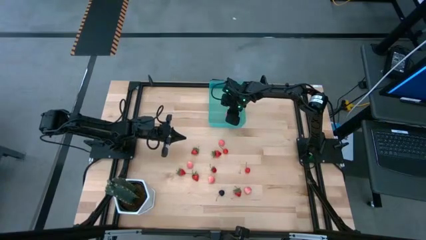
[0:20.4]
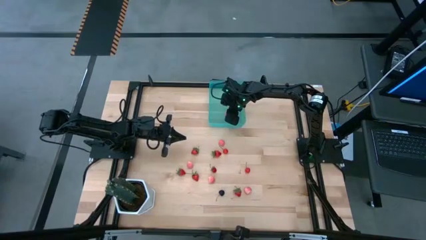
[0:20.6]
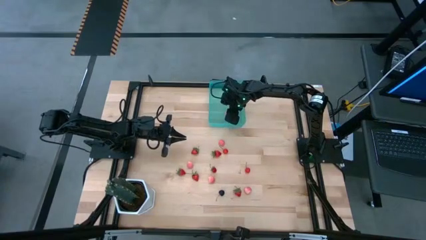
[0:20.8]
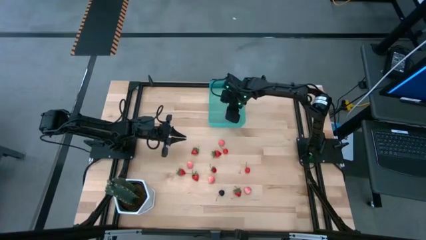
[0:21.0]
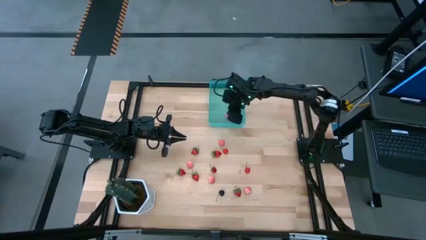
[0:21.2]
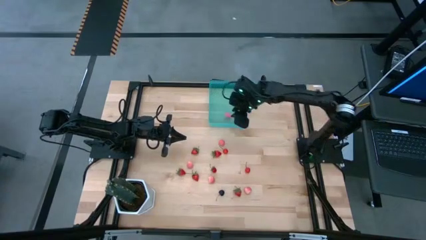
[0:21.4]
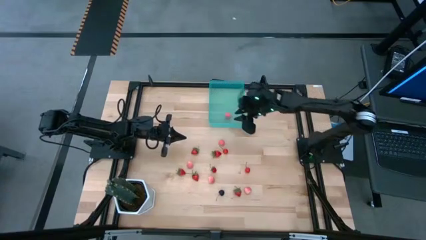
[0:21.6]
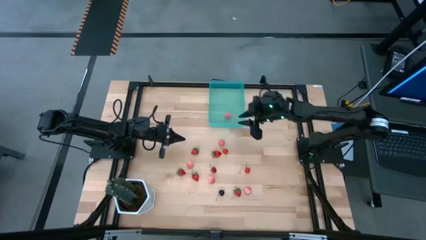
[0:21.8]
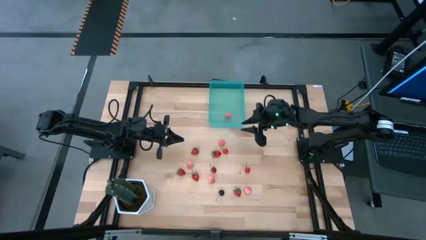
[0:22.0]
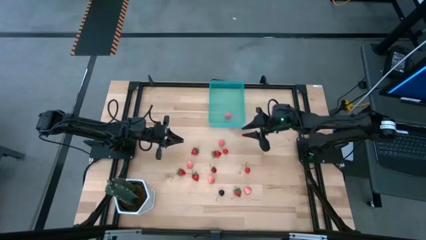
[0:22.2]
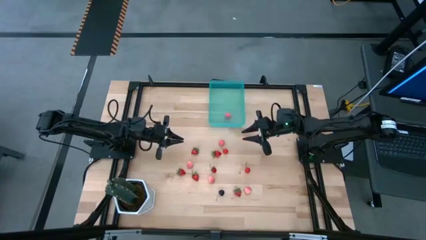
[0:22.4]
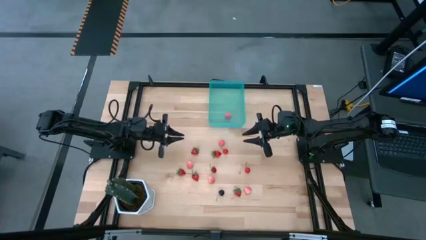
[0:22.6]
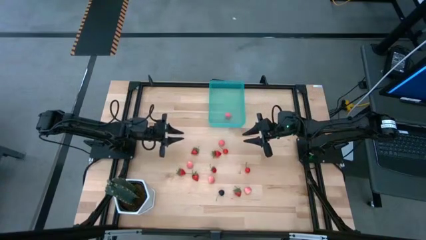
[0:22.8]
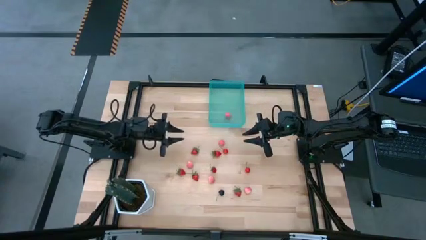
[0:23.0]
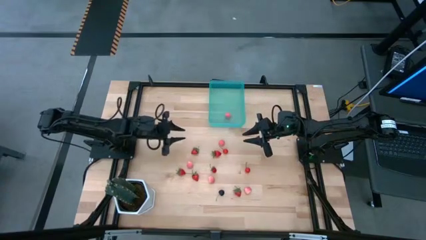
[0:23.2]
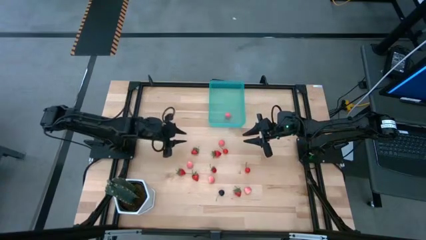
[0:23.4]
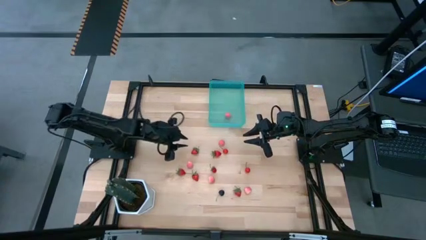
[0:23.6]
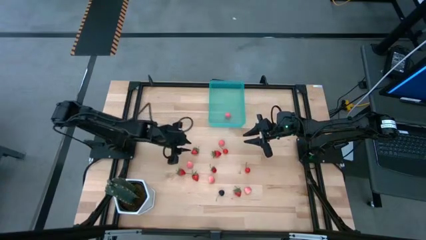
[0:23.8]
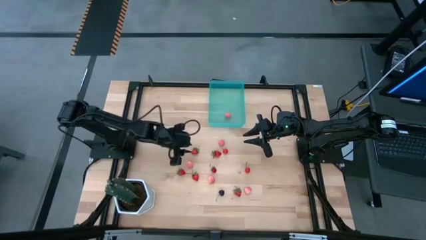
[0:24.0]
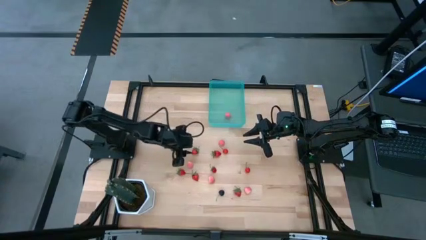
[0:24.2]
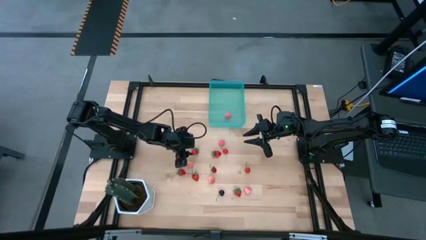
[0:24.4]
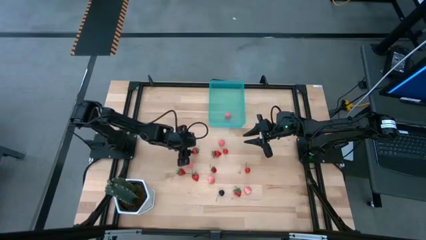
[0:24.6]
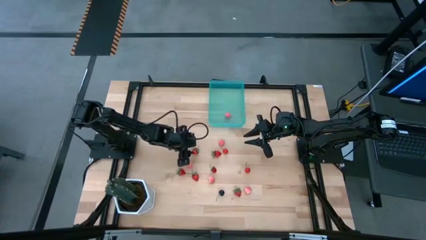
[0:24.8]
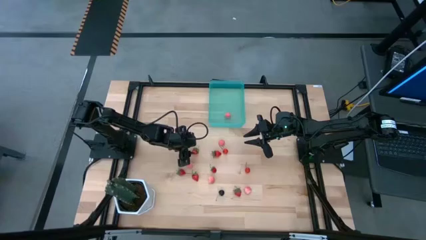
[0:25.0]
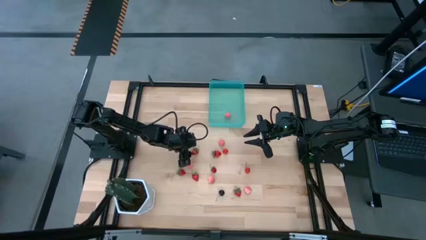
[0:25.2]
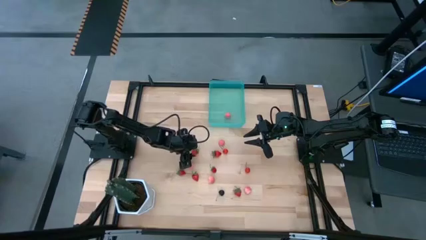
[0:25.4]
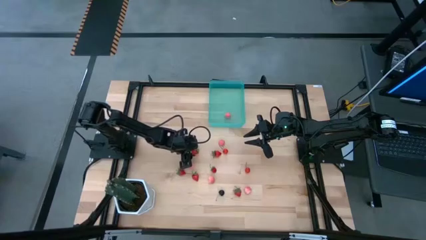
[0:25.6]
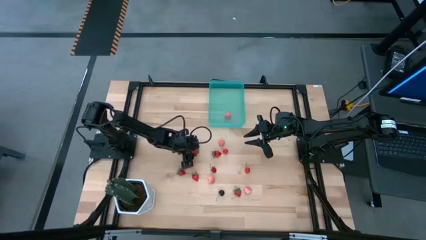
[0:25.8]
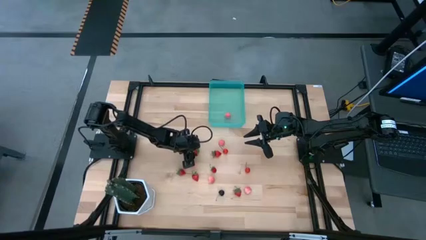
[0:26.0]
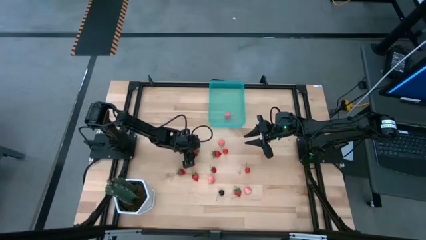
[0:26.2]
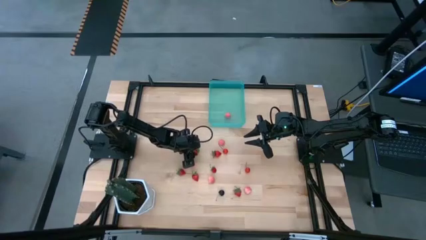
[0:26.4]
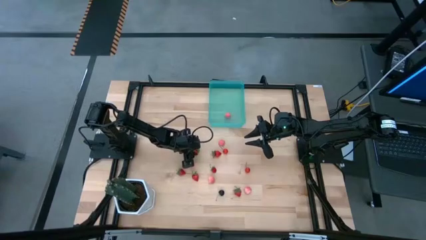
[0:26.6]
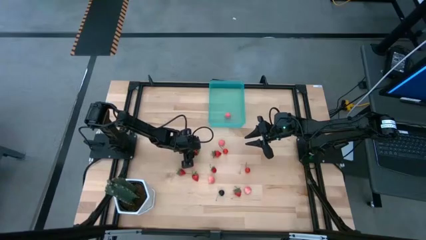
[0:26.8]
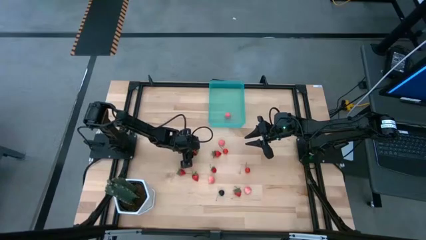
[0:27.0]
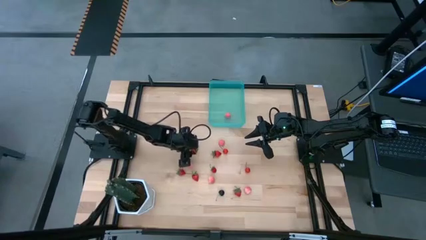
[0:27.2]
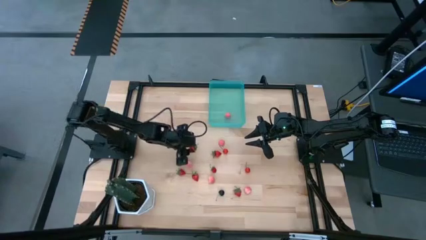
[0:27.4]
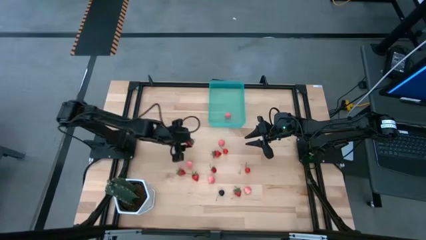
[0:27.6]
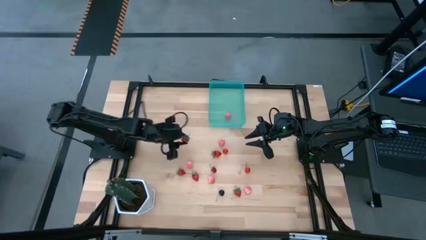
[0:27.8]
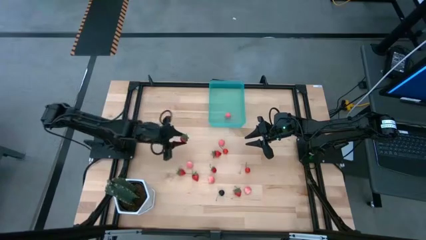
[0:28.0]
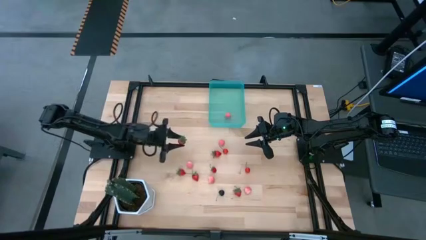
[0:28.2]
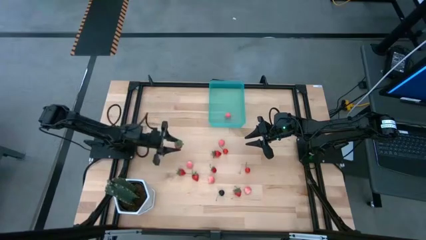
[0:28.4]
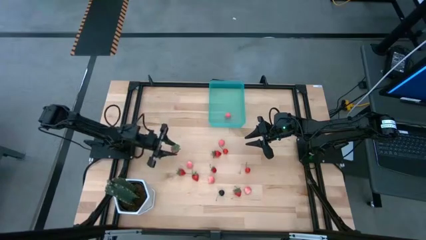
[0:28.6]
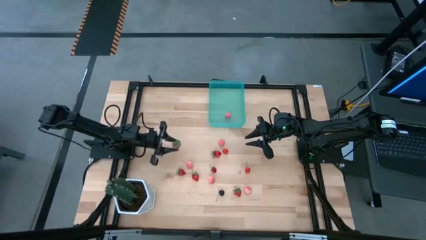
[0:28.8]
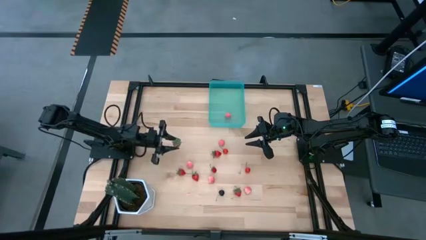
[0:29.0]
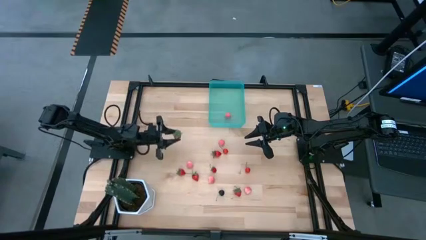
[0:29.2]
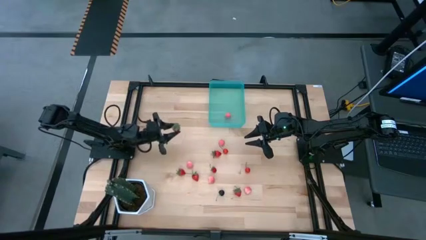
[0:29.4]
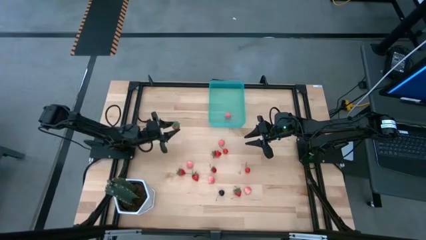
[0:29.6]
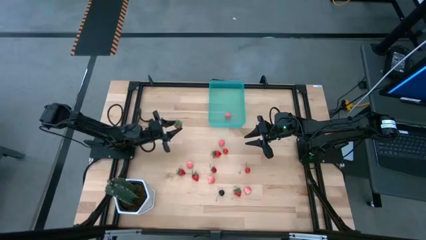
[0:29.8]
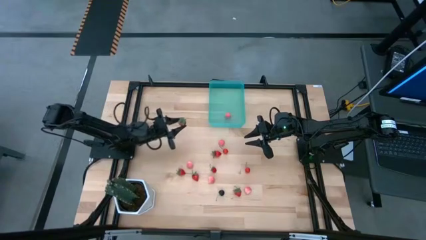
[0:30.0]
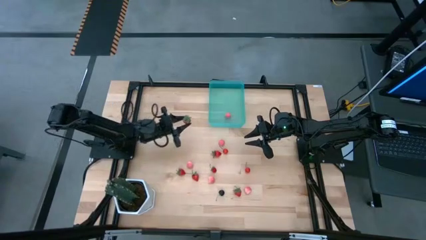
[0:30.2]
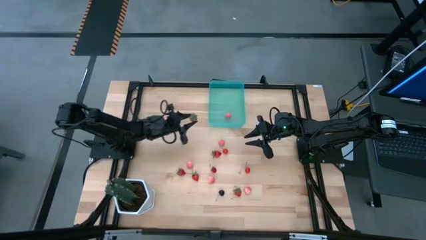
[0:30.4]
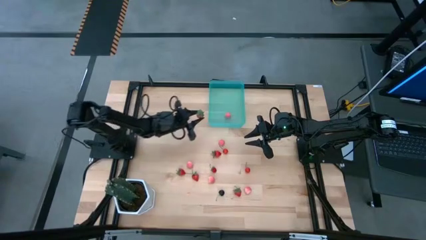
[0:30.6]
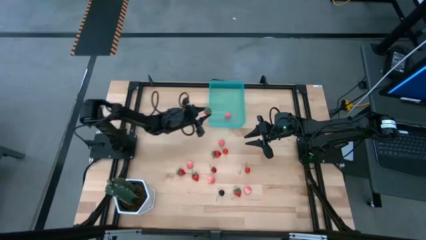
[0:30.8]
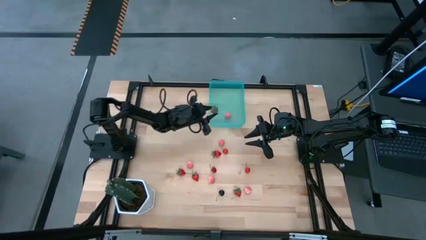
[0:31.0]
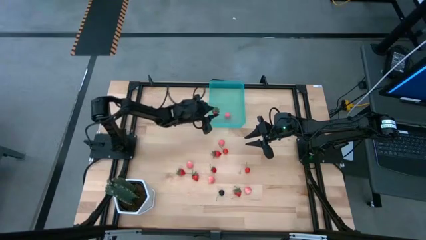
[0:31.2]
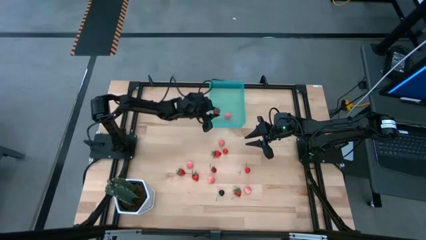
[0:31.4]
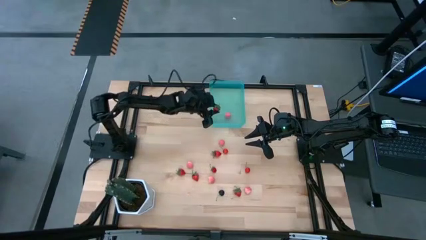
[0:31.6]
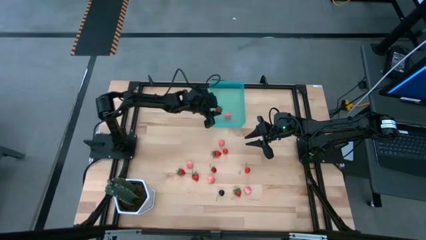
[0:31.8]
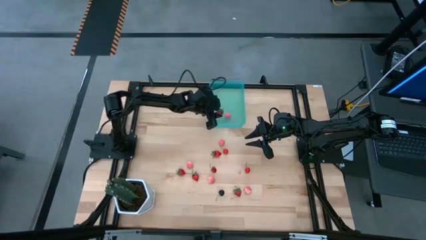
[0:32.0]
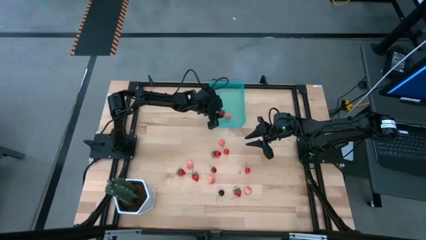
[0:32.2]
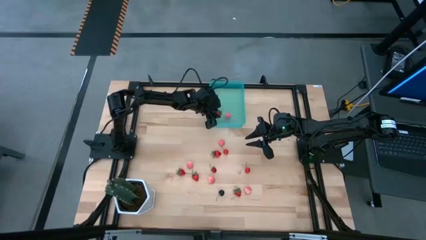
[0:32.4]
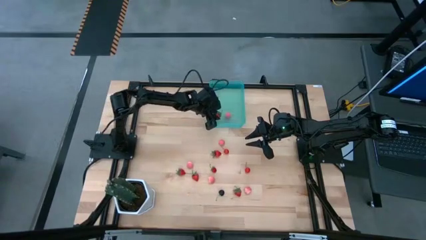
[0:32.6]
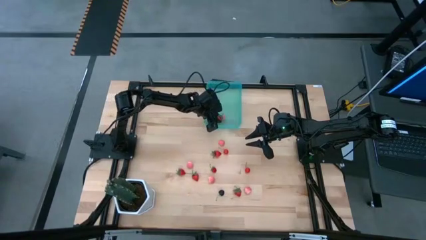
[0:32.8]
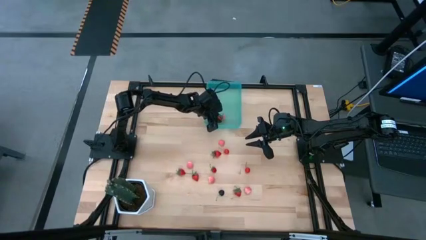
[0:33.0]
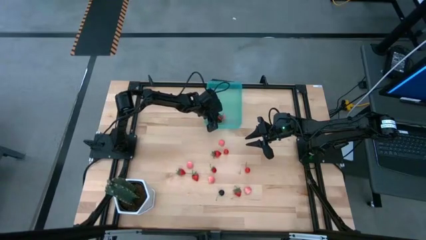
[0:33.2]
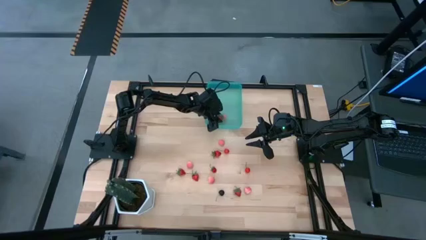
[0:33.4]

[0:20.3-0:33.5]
Task: Pick and placing Produce into tupperware
Put the red strawberry into the blue bin

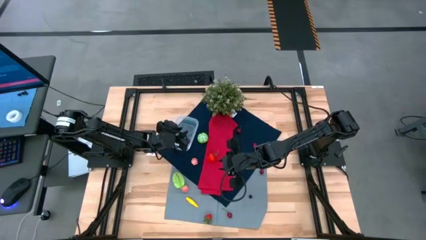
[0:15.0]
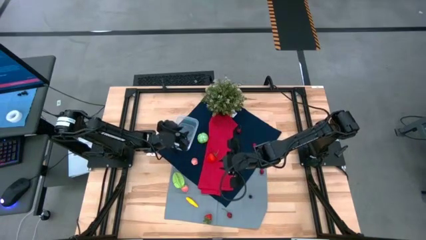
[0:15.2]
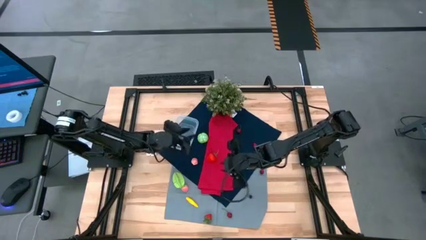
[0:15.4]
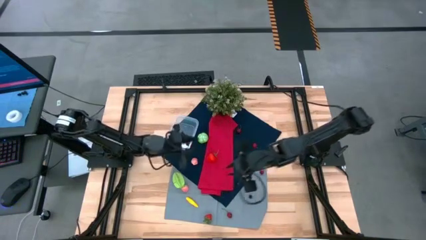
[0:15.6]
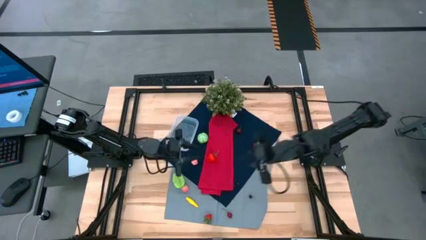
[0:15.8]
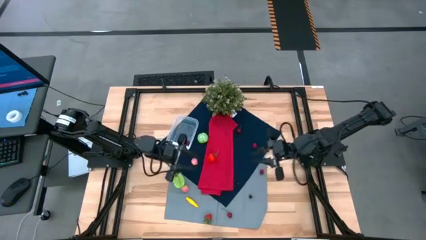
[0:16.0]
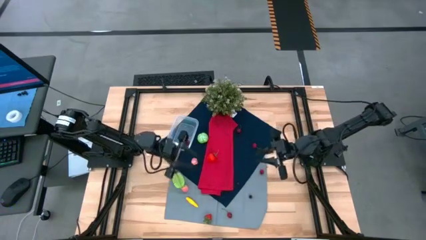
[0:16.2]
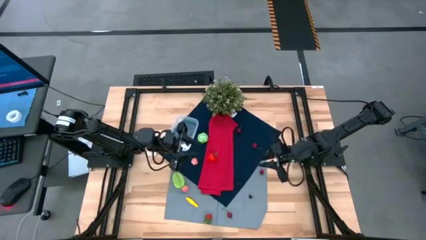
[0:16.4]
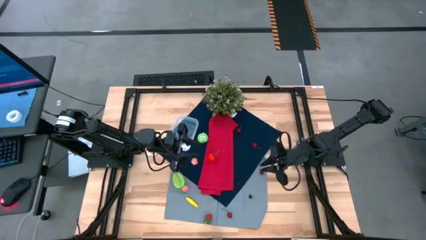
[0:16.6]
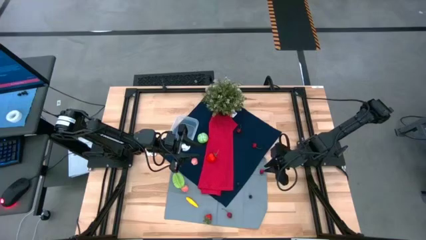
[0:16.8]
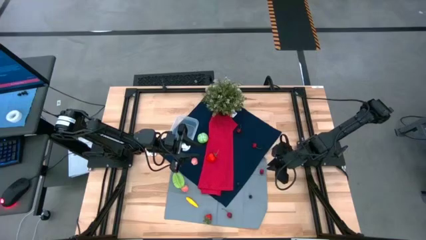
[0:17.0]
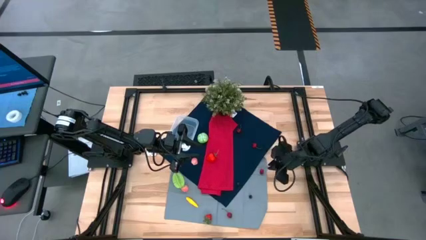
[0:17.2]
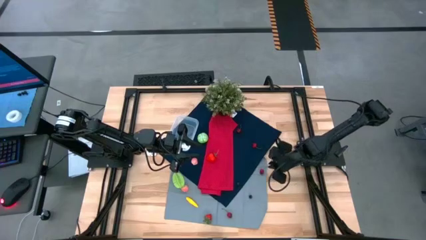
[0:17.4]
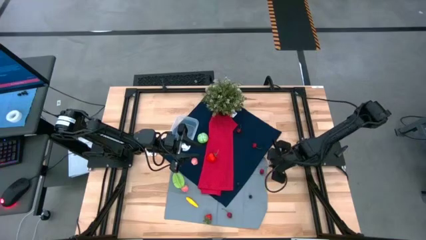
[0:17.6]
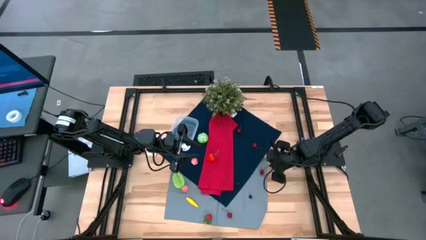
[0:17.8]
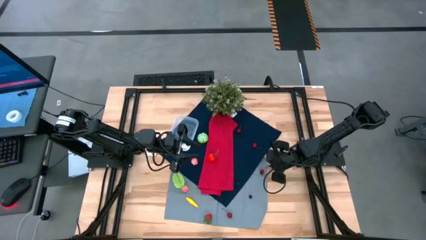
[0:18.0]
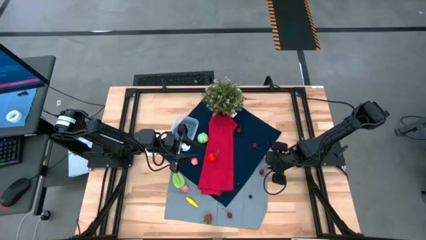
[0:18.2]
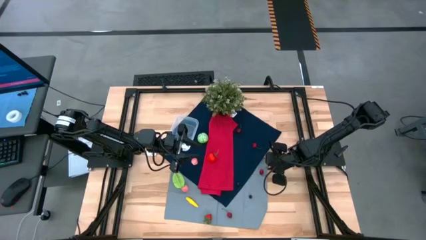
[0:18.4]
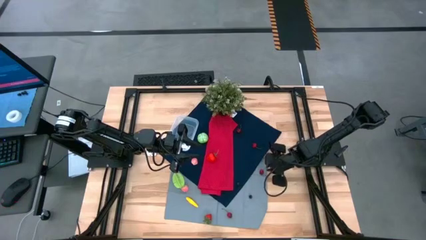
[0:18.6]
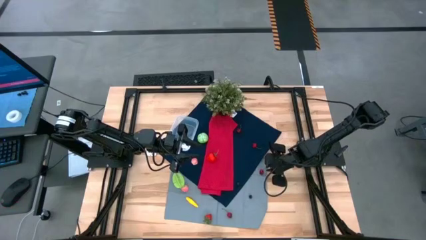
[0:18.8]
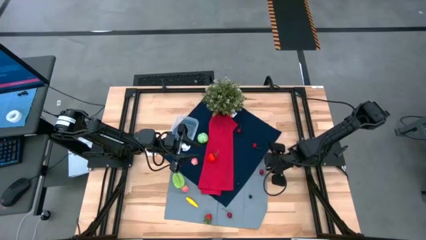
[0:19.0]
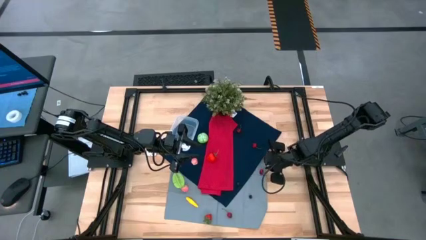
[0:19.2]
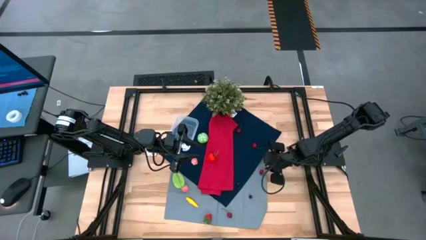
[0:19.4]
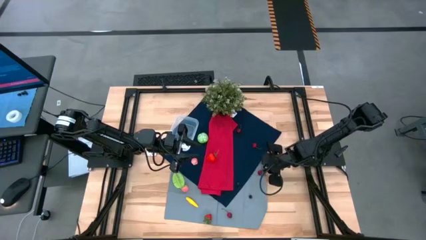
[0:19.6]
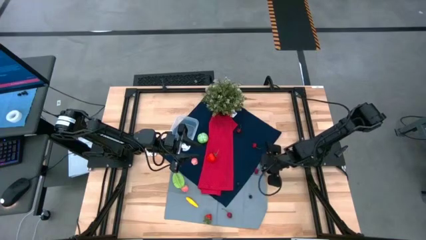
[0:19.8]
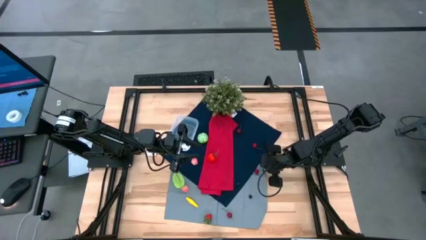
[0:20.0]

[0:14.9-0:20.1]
Task: Pick and placing Produce into tupperware
Put the red cherry into the transparent bin
